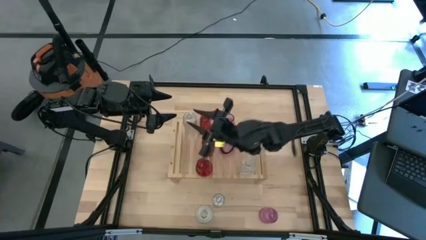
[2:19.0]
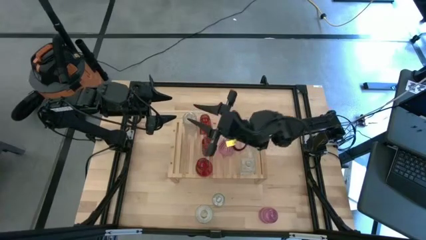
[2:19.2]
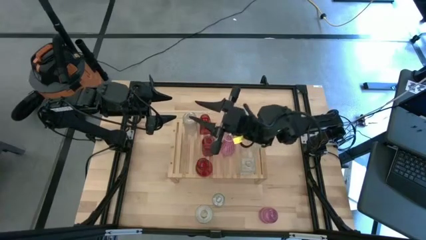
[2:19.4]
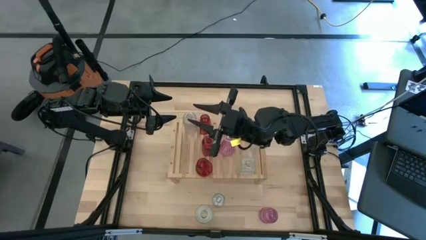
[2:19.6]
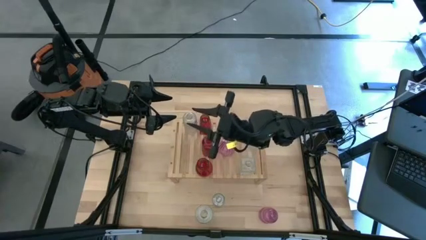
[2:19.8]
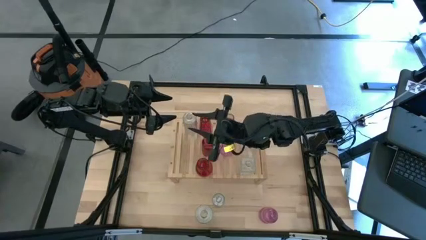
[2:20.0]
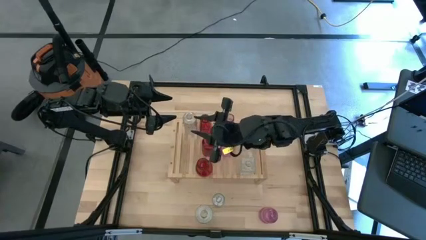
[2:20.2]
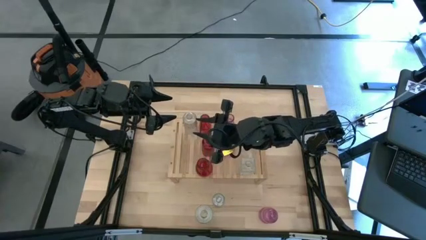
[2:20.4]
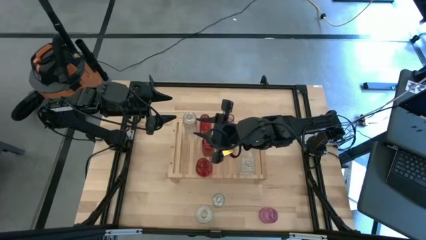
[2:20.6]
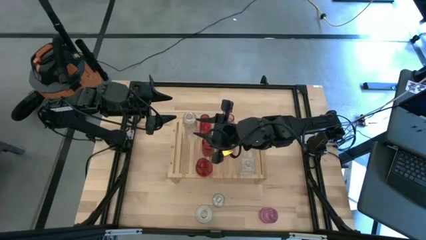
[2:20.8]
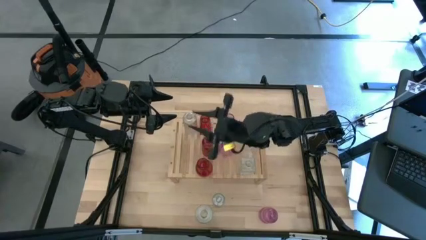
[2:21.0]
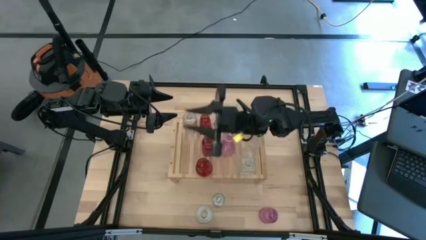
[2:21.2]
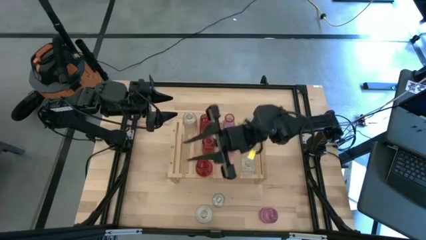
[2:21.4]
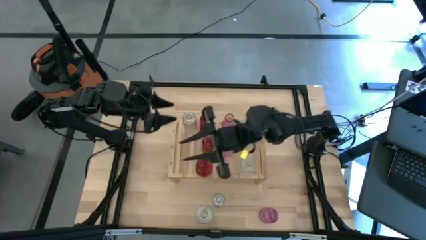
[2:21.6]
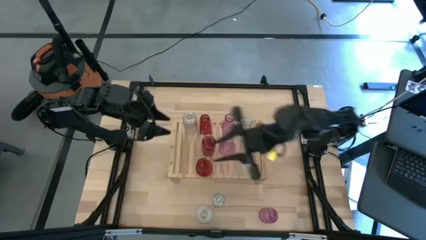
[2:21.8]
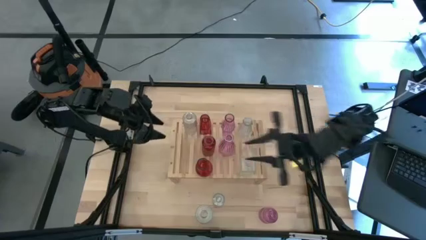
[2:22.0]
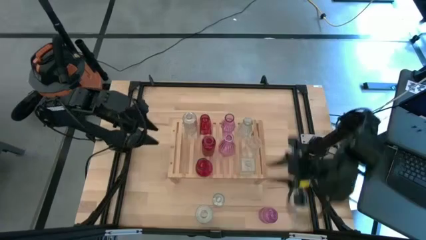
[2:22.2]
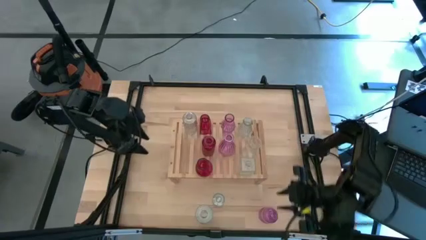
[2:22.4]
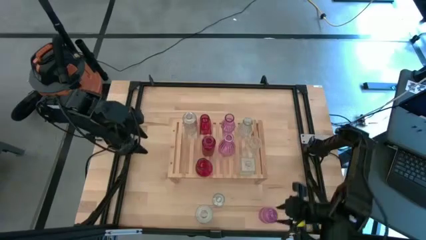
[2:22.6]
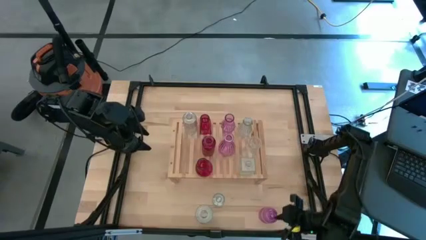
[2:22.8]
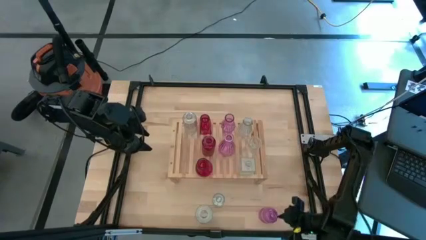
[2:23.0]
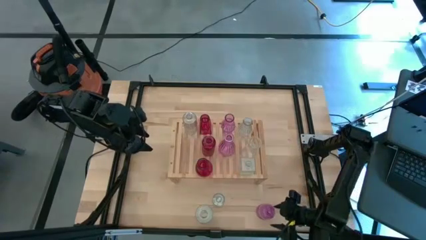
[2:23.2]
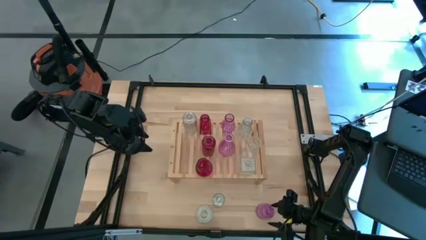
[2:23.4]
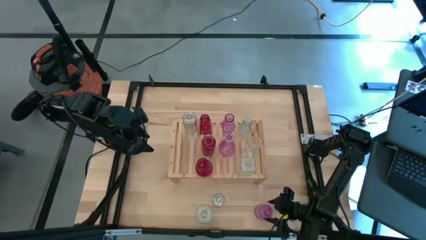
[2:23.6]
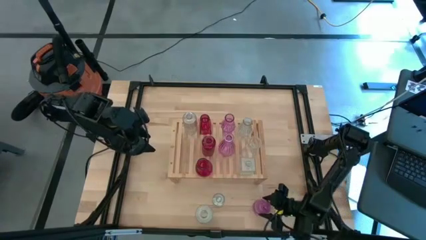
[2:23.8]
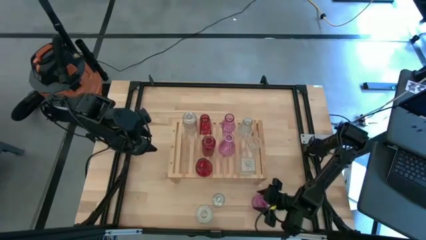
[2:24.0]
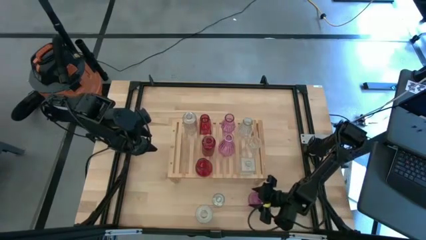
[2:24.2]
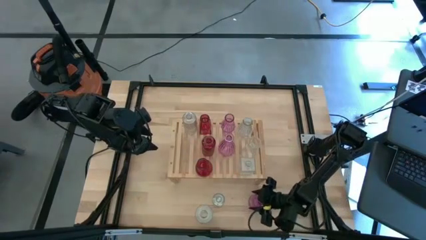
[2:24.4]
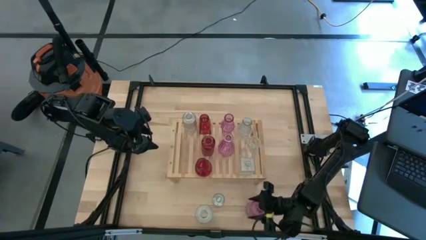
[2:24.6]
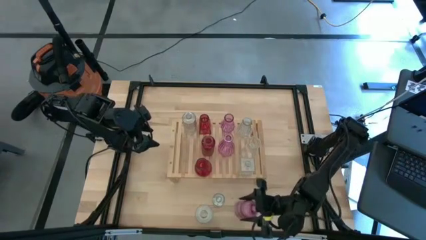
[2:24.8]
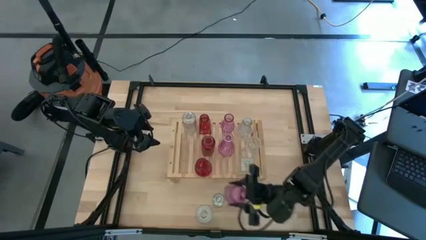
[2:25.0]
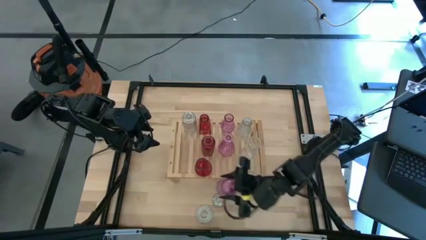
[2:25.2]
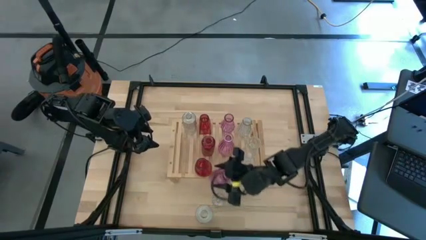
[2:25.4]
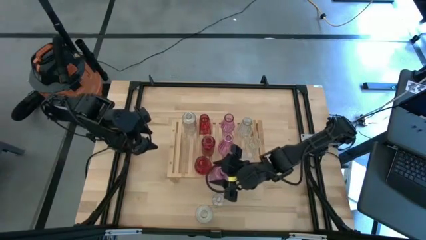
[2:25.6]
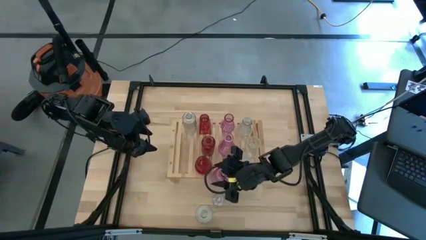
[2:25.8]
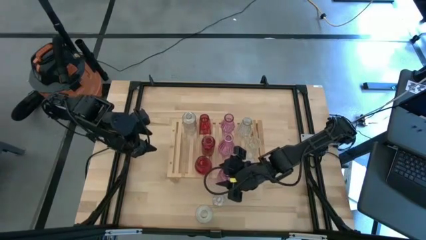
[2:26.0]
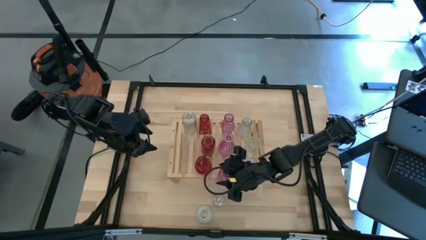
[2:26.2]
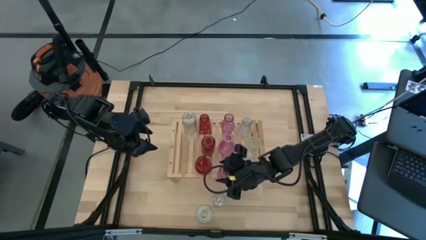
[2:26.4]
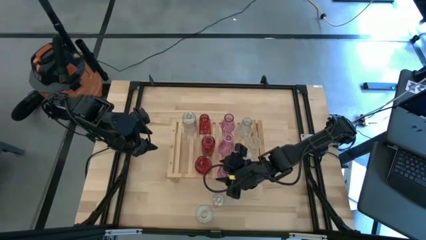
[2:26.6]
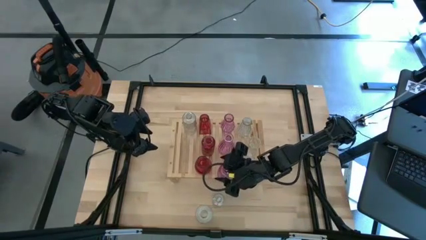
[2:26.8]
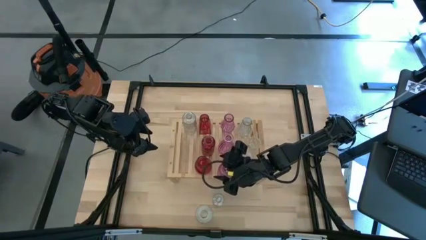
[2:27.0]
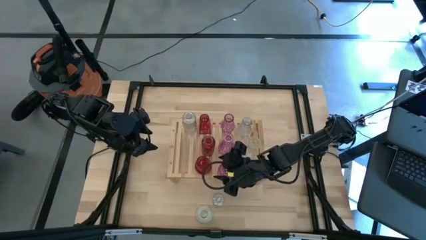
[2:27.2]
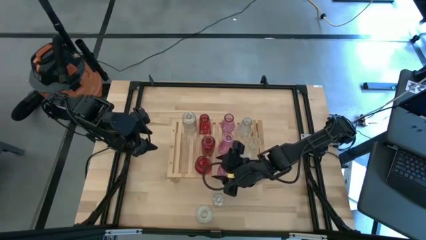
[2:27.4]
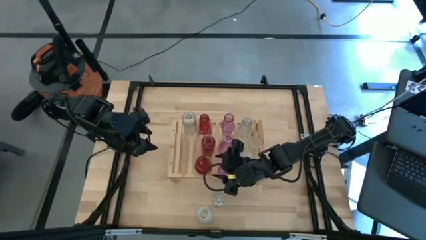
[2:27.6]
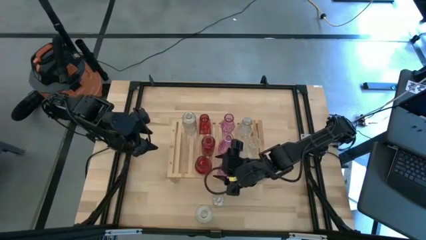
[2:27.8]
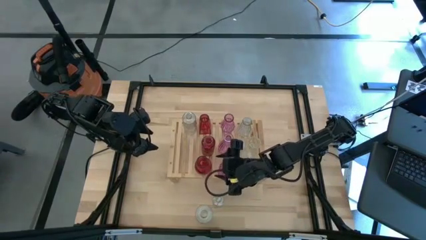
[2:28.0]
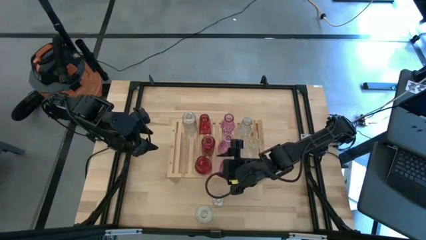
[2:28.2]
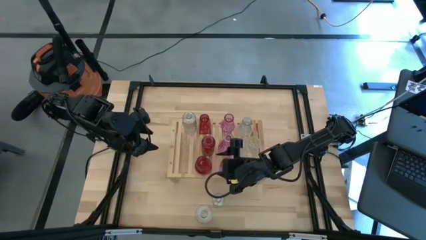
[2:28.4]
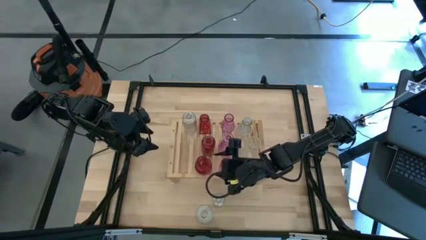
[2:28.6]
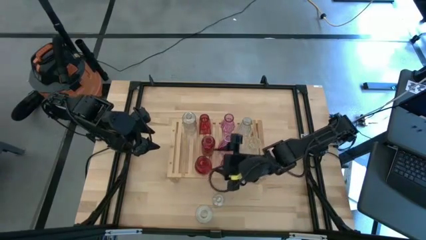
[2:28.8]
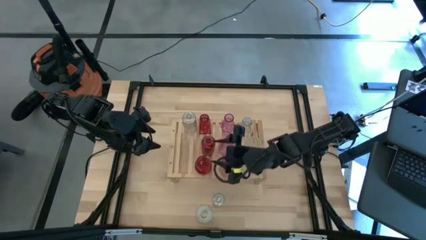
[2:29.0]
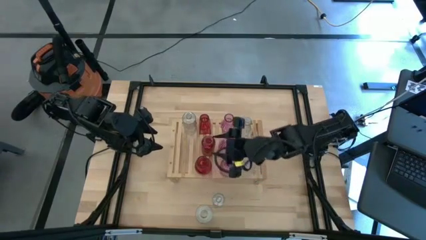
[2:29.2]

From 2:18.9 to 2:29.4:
Task: sort vases onto shelf
Put the violet vase on the shelf aligned with the other violet vase

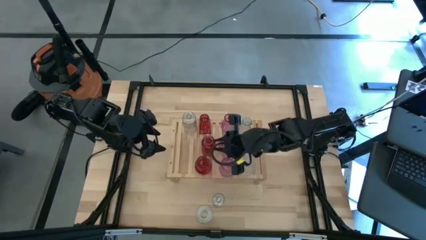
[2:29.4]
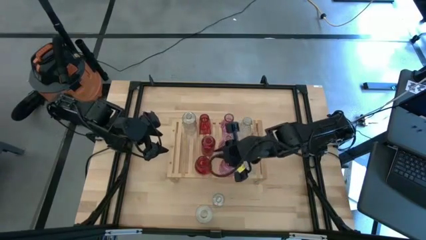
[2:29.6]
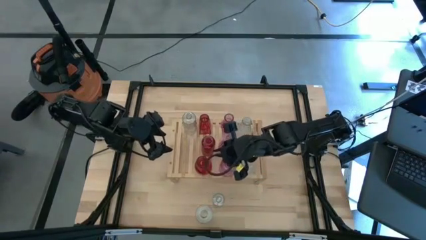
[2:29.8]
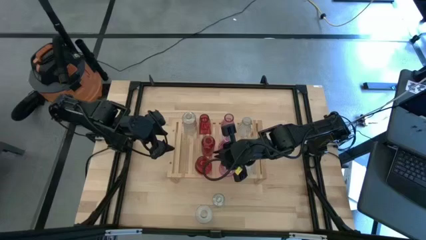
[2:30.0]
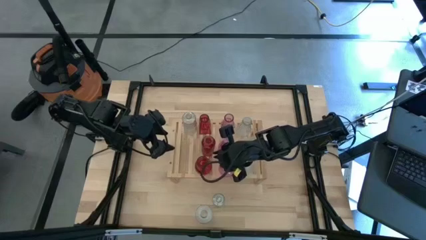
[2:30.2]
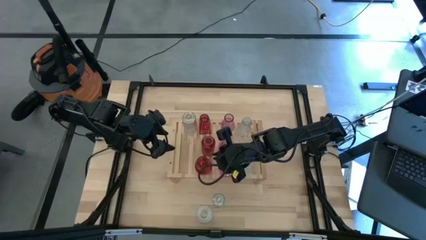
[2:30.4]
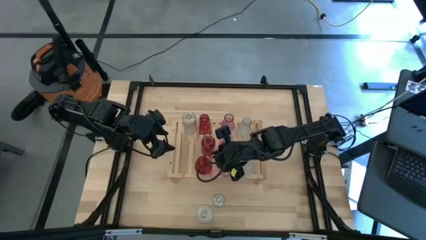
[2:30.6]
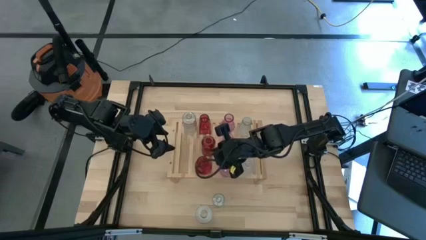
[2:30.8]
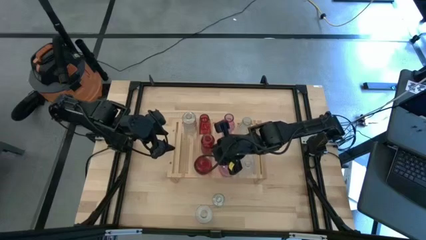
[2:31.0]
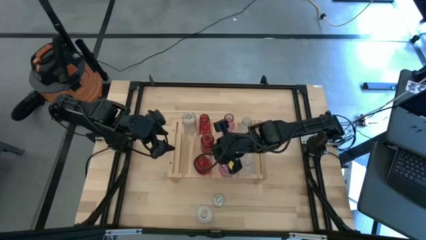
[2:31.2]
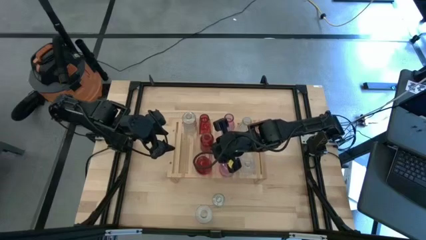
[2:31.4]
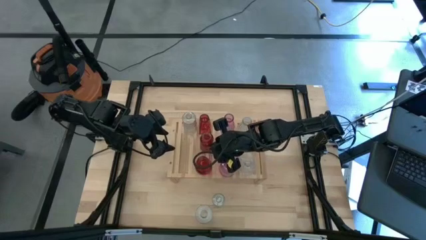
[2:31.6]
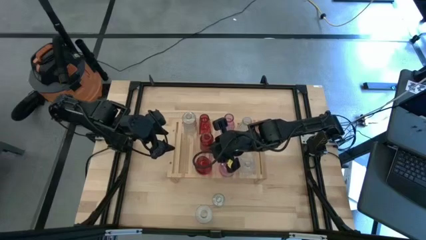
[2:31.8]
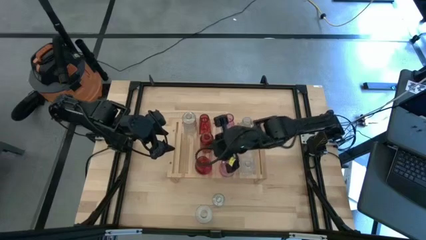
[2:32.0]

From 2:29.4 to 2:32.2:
Adjust the red vase on the shelf

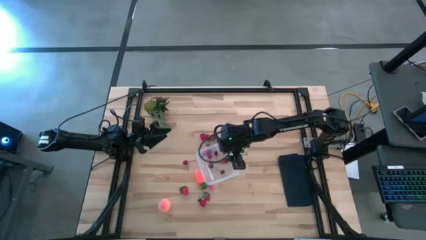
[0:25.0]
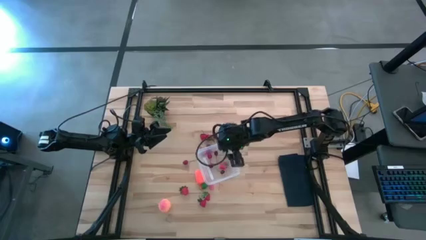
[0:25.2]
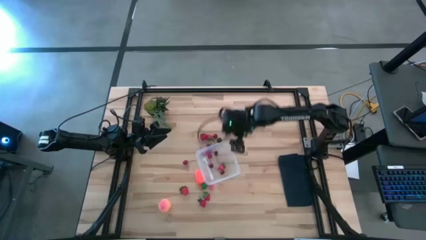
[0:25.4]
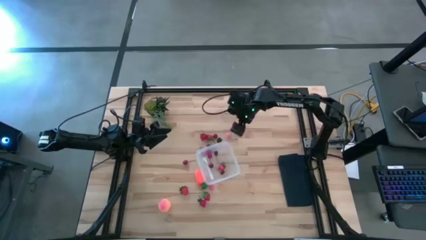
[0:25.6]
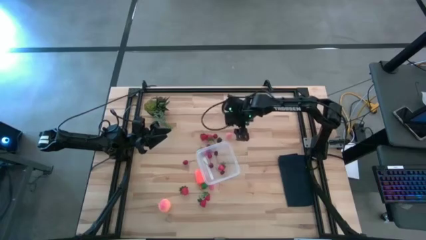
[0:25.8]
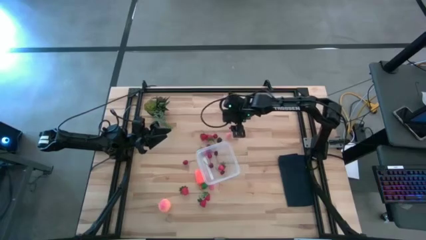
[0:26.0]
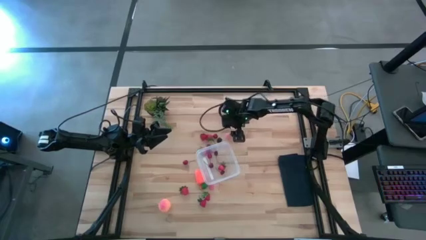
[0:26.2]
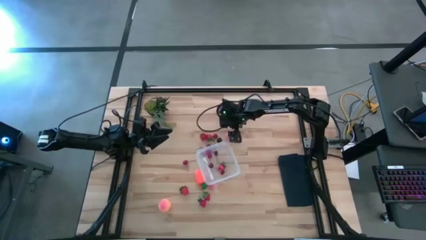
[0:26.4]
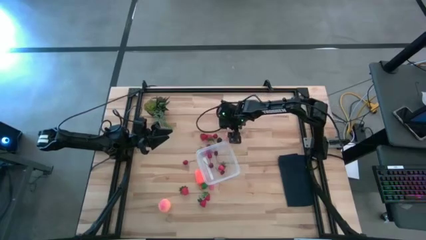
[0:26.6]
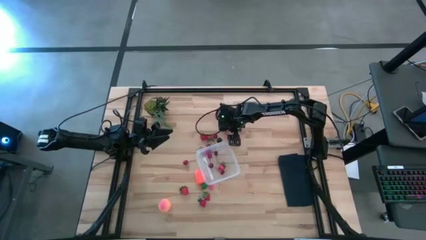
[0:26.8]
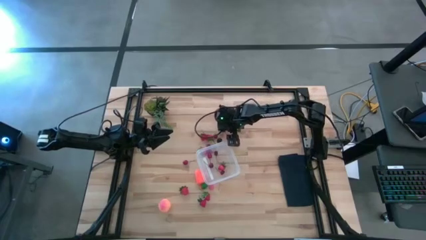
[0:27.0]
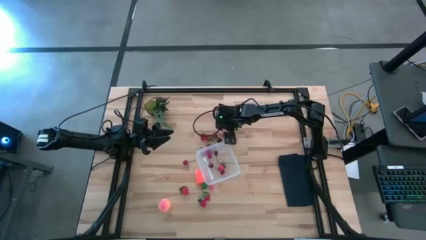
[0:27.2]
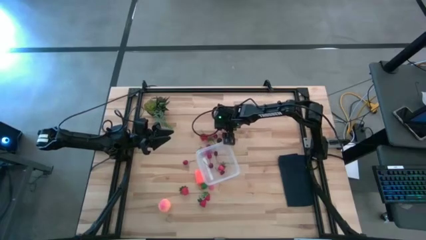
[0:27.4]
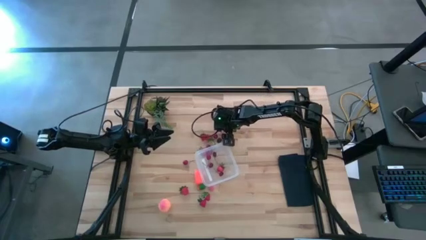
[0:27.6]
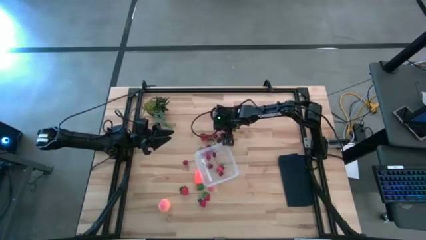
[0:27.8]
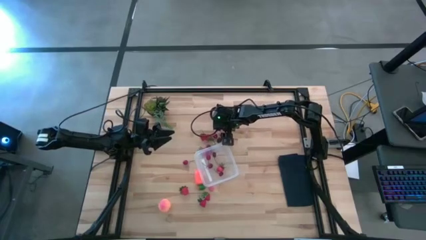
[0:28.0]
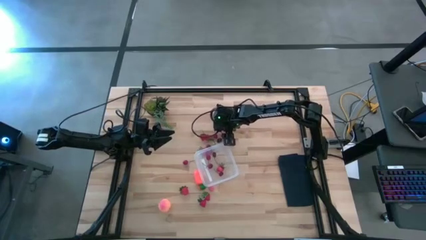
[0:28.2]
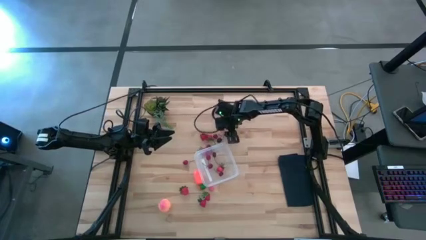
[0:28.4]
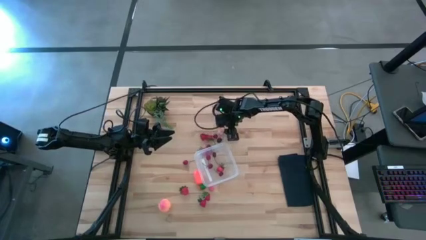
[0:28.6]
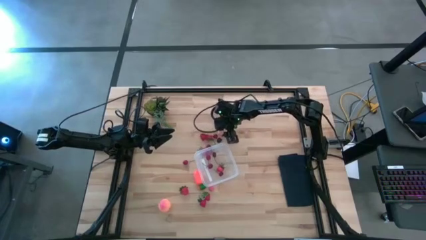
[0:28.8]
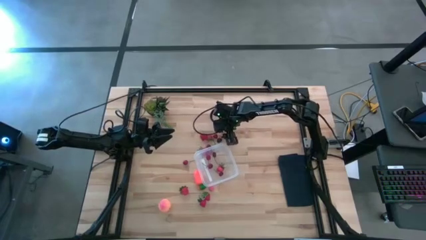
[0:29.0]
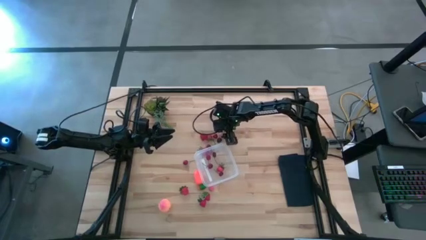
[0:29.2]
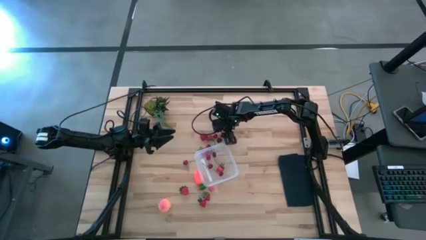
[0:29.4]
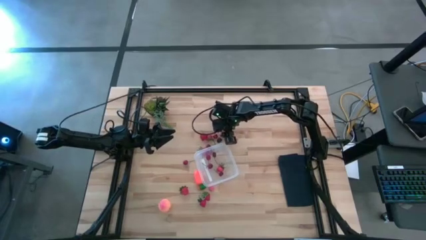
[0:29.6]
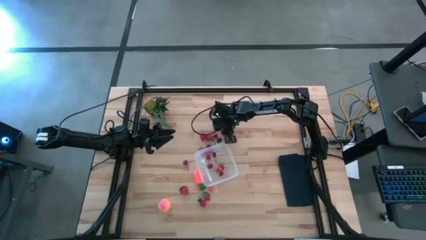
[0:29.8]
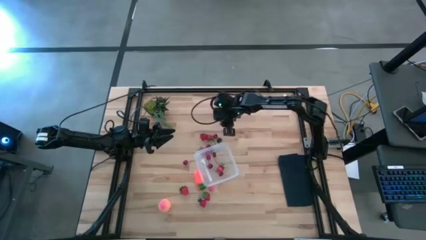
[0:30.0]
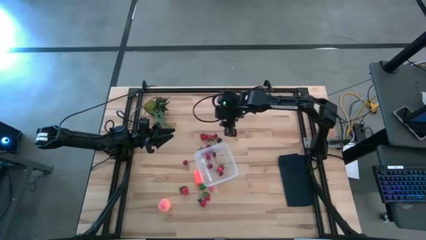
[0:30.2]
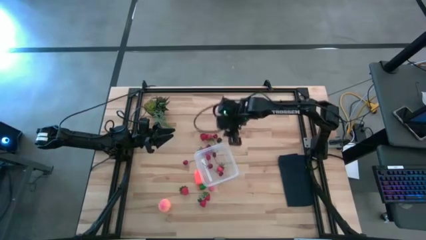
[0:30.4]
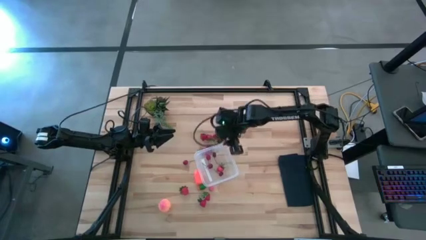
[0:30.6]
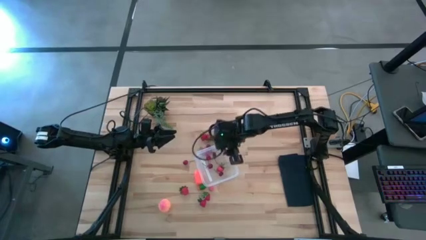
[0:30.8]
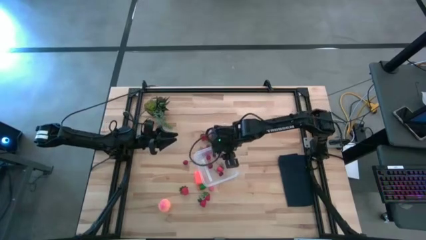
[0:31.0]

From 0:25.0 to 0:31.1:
Task: Pick and placing Produce into tupperware
Put the peach into the transparent container
